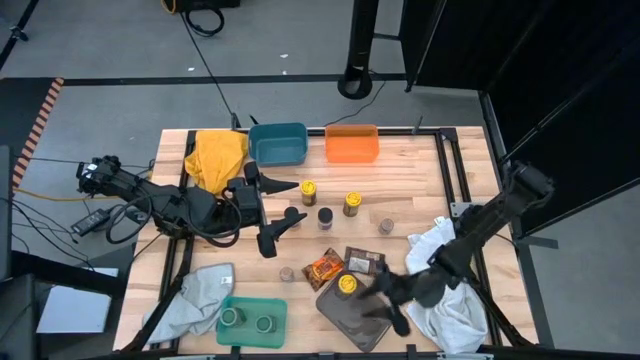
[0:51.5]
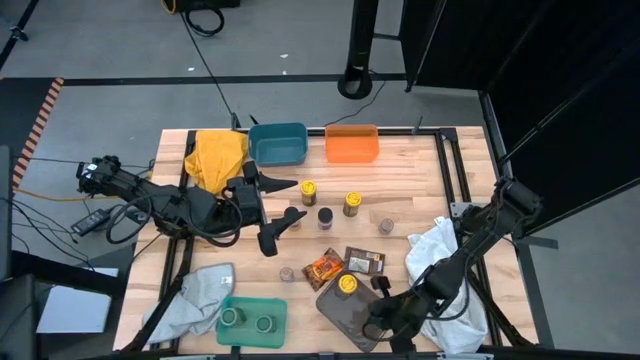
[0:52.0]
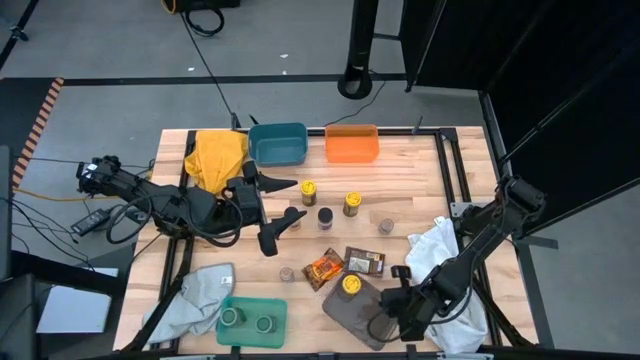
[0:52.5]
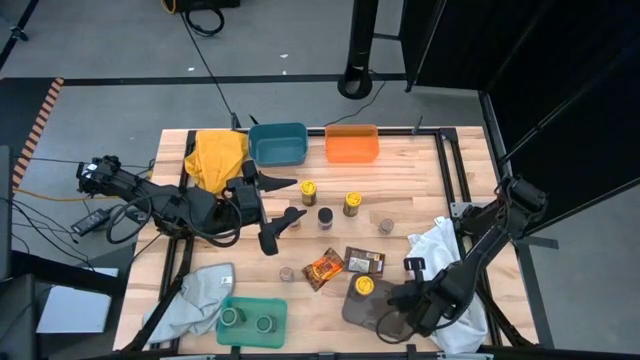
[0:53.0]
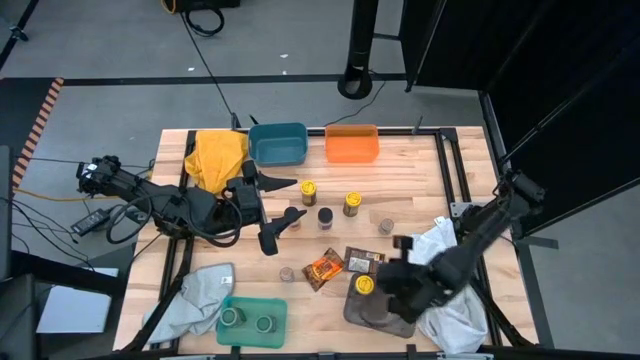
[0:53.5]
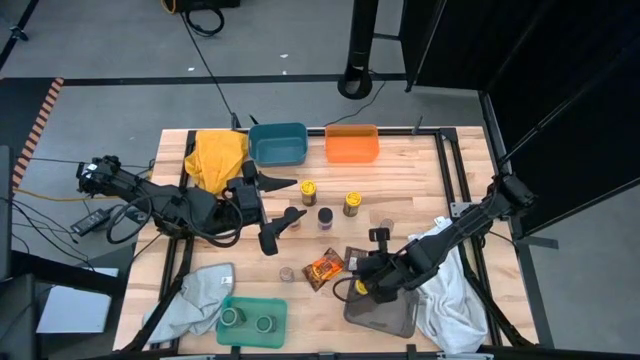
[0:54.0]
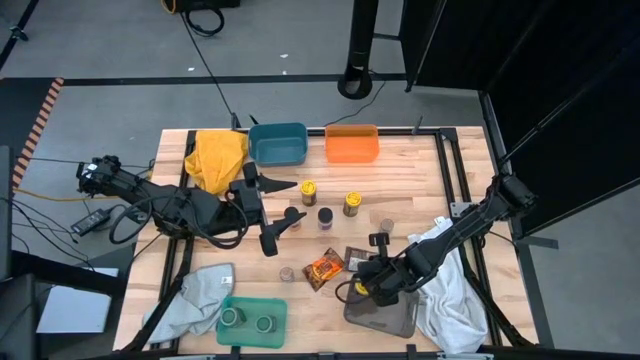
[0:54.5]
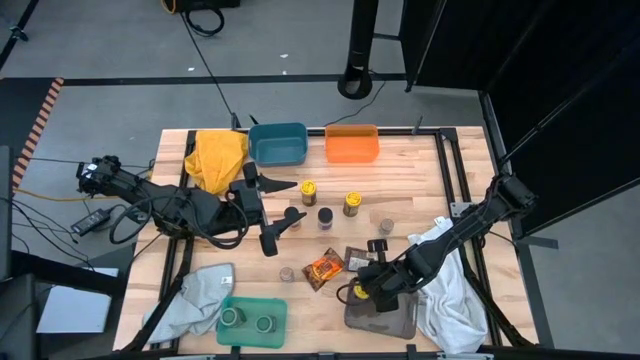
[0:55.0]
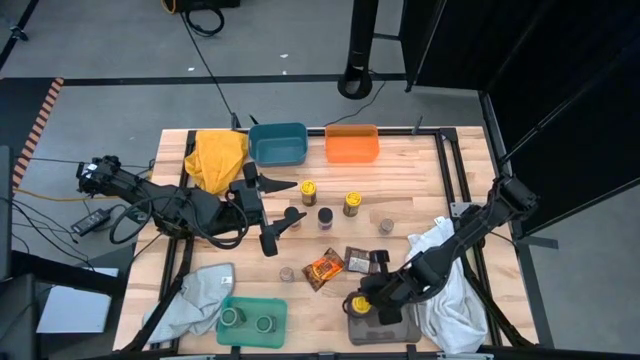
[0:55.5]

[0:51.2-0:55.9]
Task: Sort spices by type
Adjust the black bin

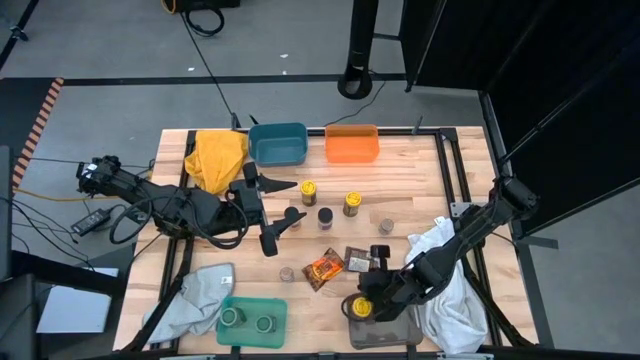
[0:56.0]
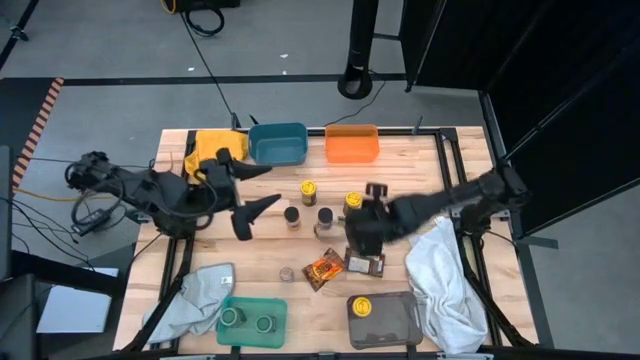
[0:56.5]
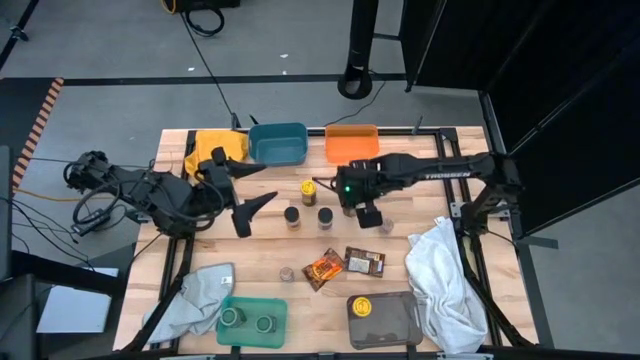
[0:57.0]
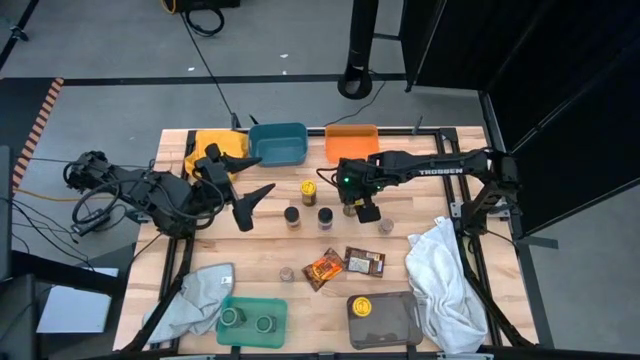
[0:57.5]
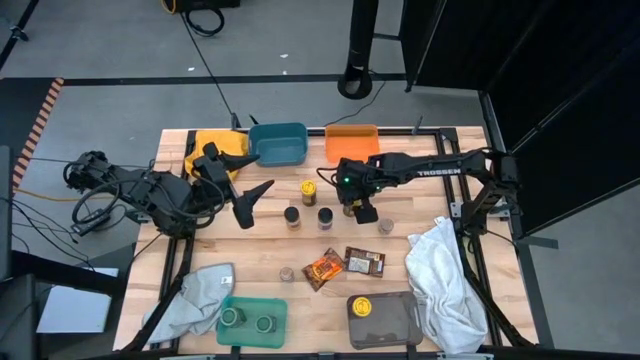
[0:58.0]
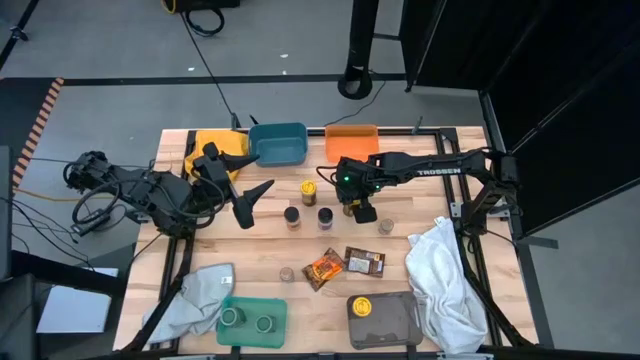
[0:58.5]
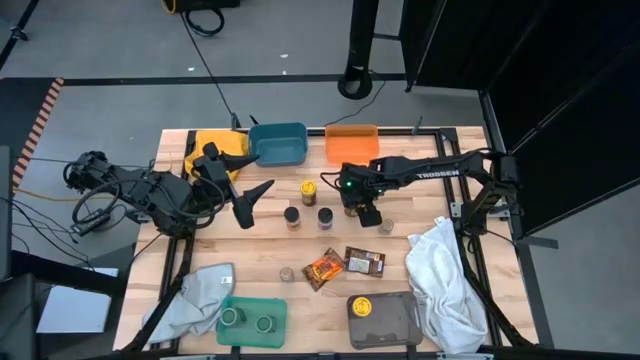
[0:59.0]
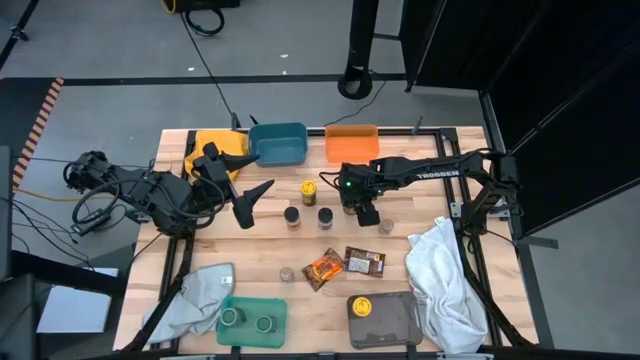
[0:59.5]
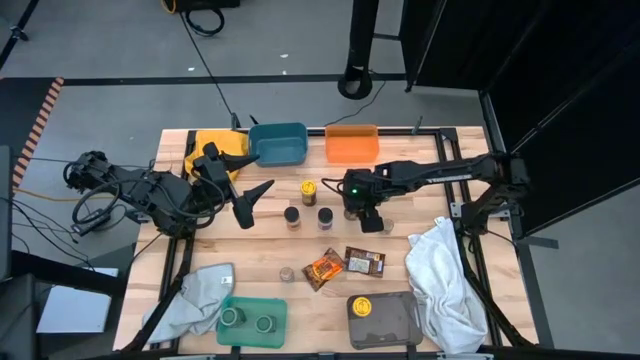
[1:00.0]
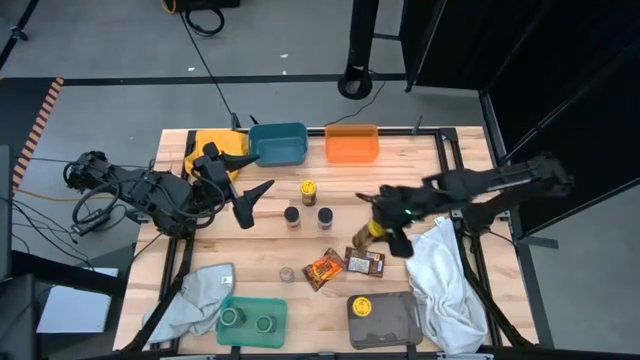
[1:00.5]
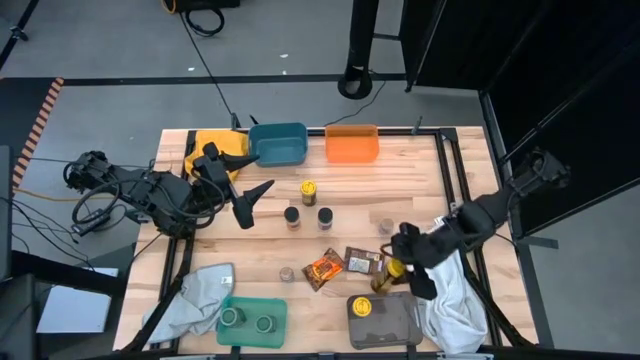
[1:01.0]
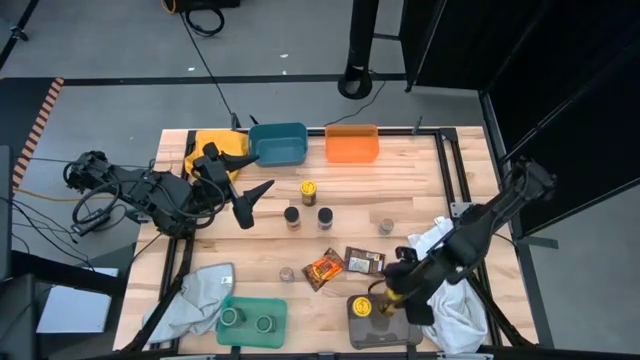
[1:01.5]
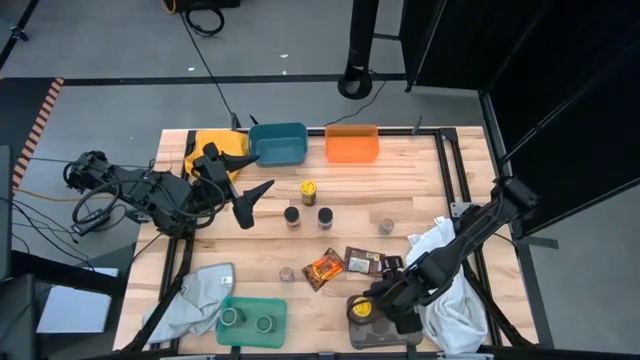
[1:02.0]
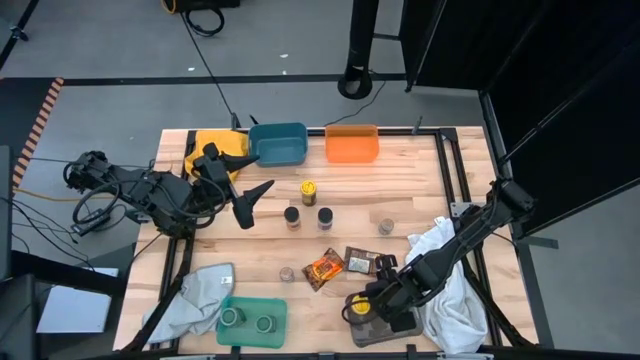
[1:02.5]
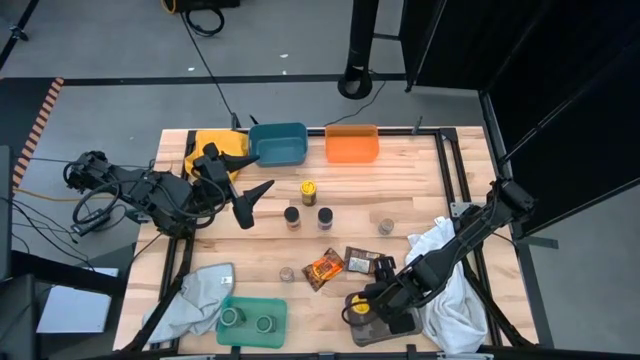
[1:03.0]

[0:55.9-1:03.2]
Put the right yellow seasoning bottle into the black bin

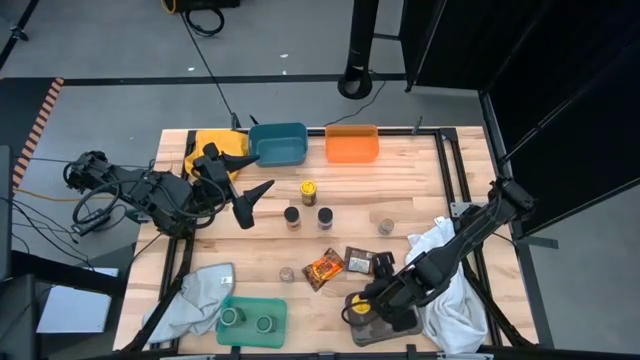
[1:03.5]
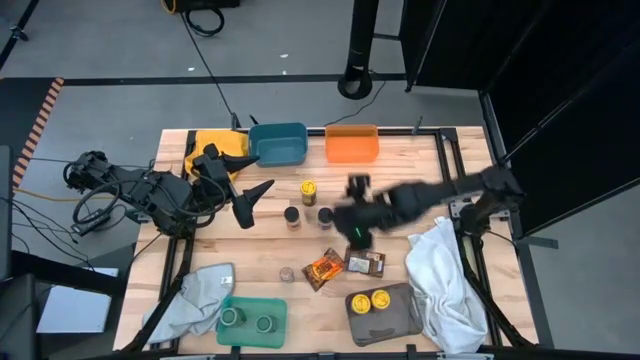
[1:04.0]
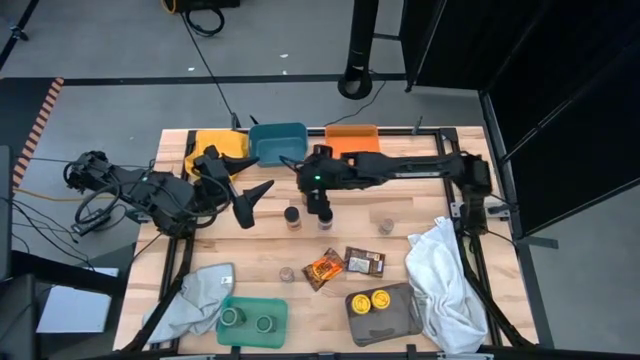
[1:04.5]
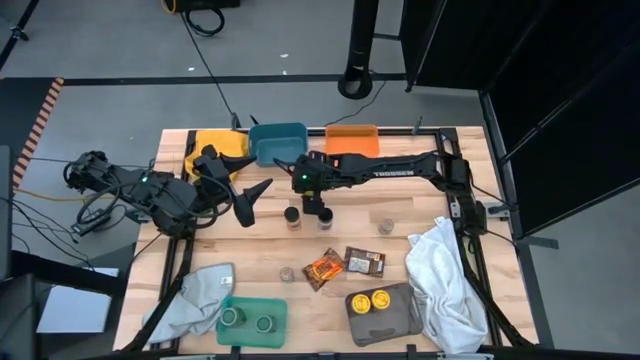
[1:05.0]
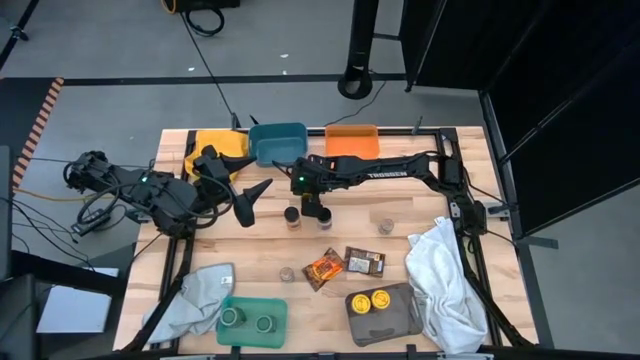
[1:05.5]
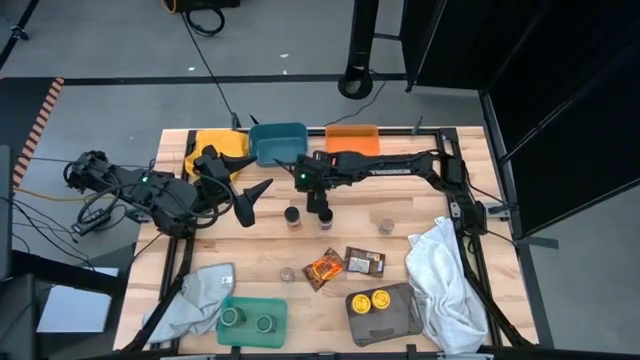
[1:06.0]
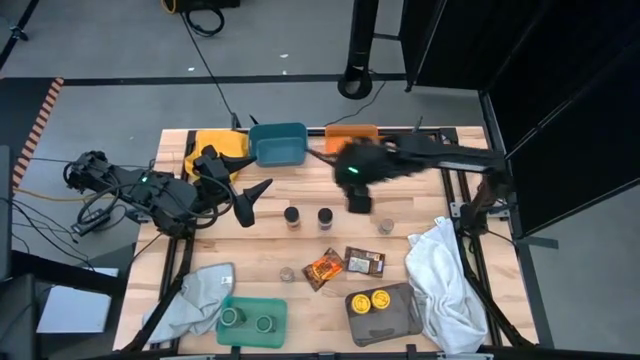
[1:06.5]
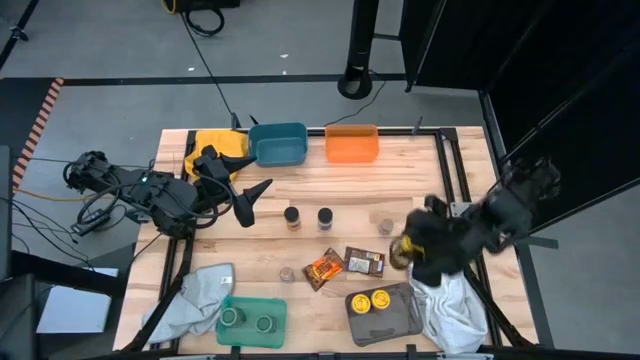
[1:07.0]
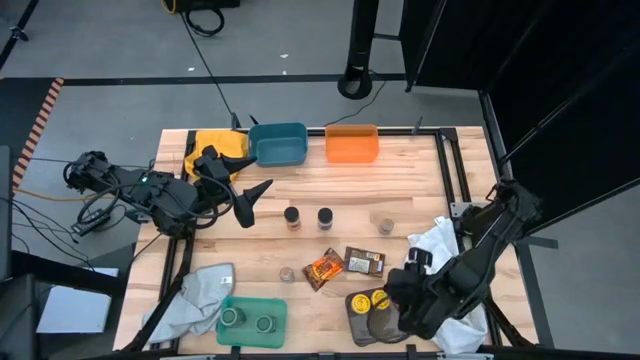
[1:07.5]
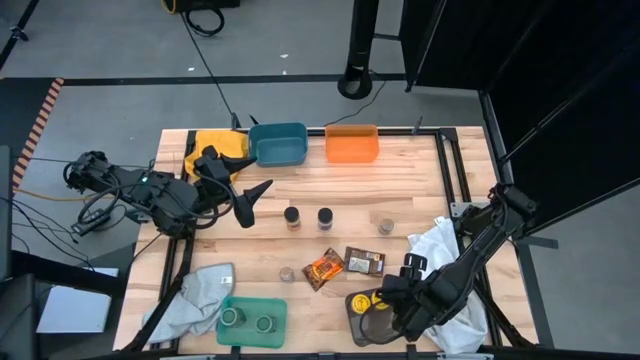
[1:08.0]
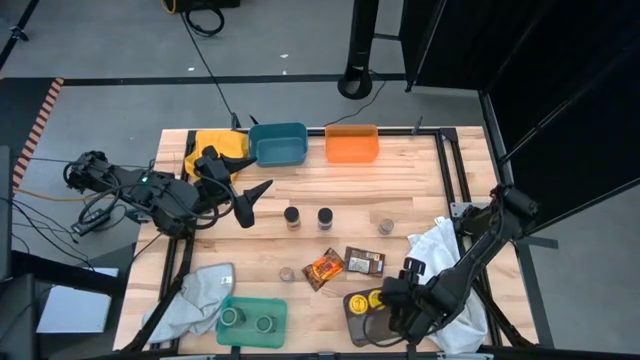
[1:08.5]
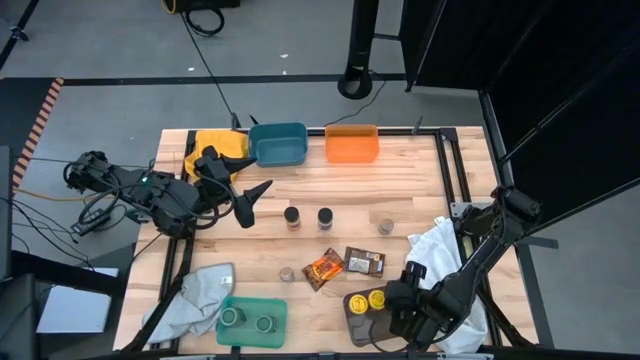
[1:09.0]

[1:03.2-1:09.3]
Put the yellow seasoning bottle into the black bin

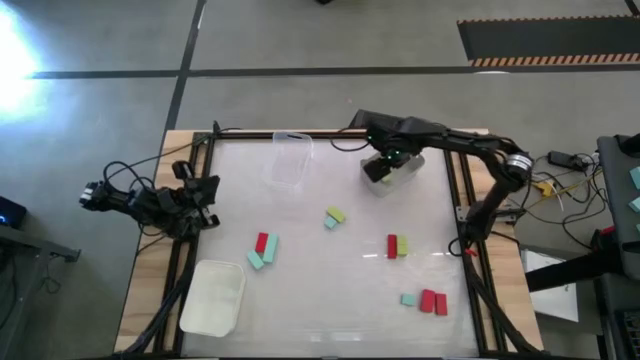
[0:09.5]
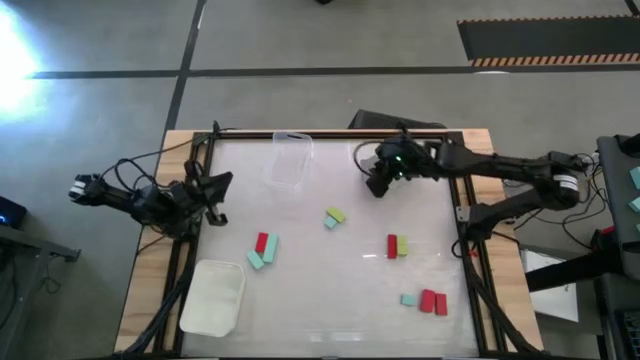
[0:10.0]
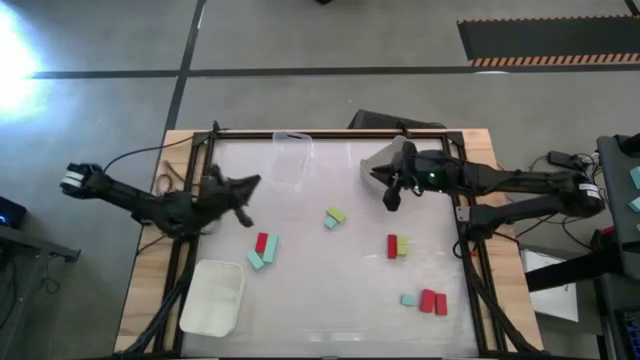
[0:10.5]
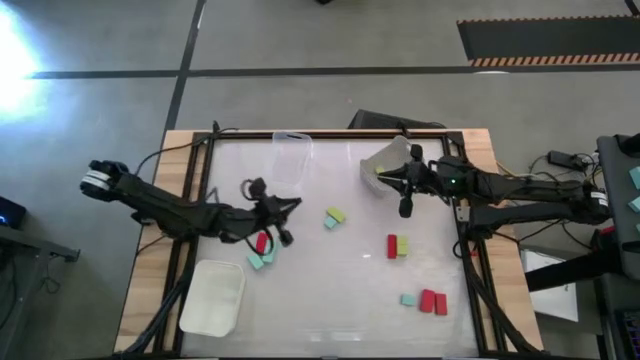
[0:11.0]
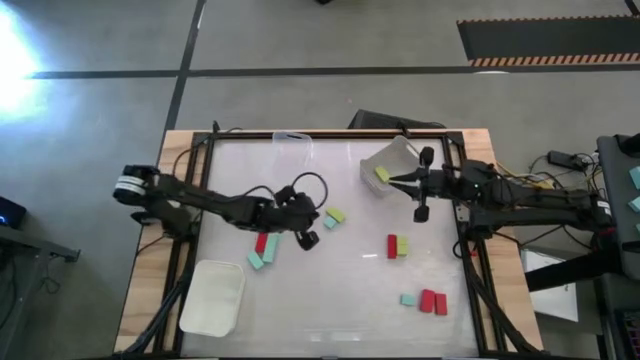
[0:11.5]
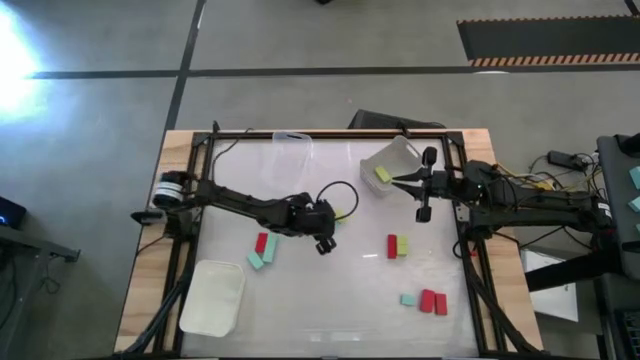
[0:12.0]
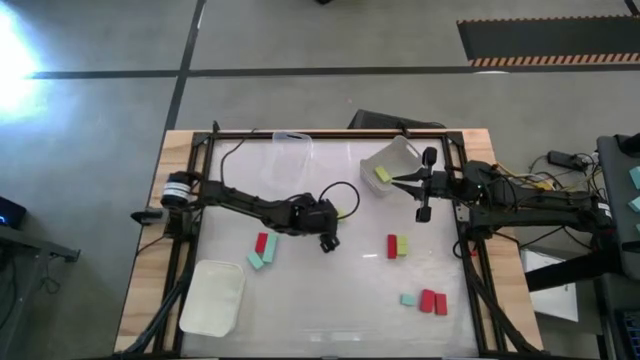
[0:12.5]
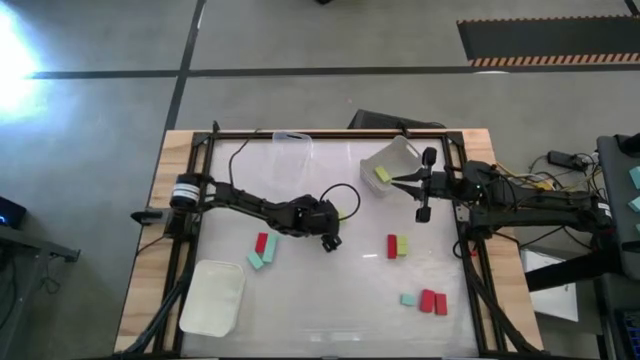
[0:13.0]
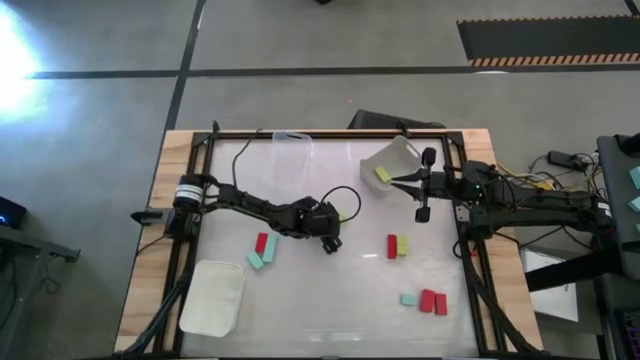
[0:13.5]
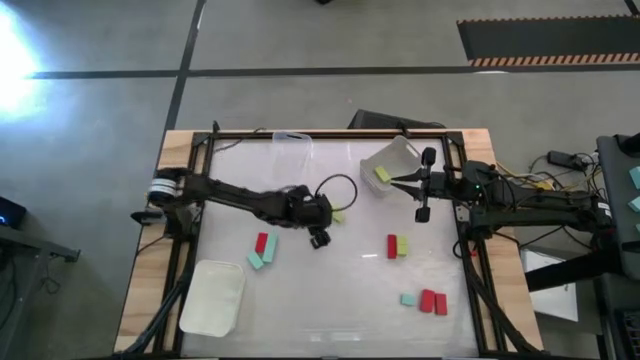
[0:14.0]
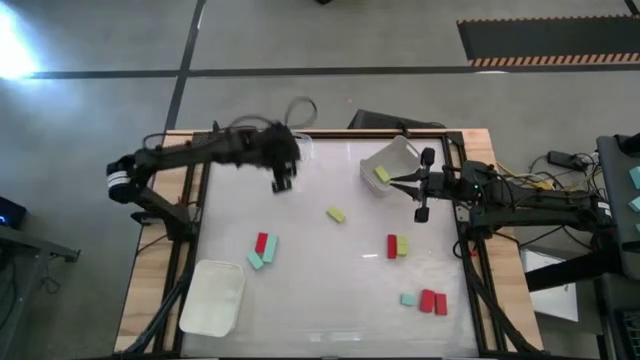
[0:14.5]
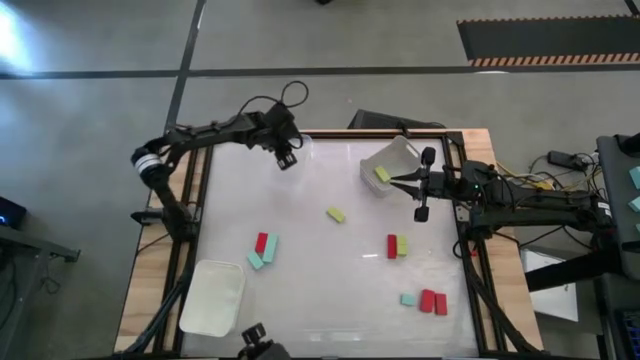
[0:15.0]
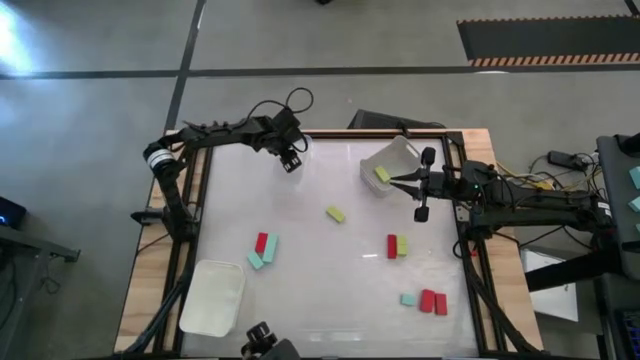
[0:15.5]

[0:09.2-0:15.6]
Task: Sort & place blocks by color
Put the light blue block into the transparent bin
